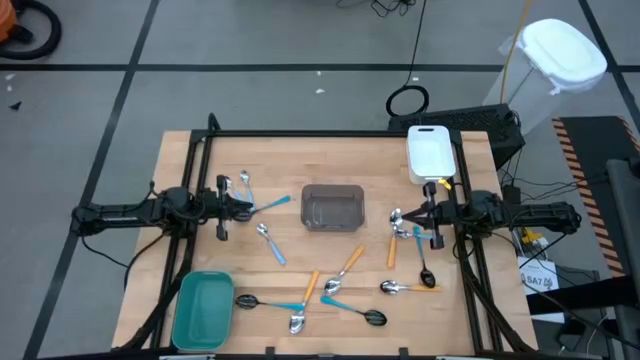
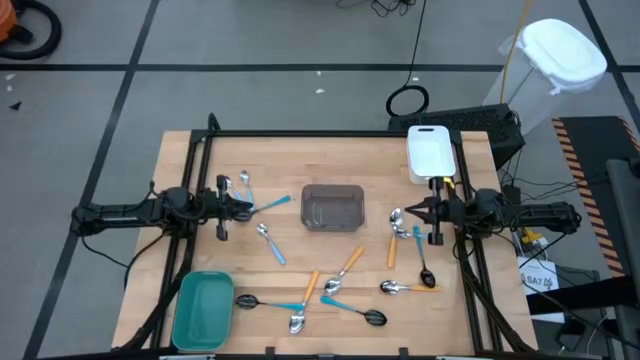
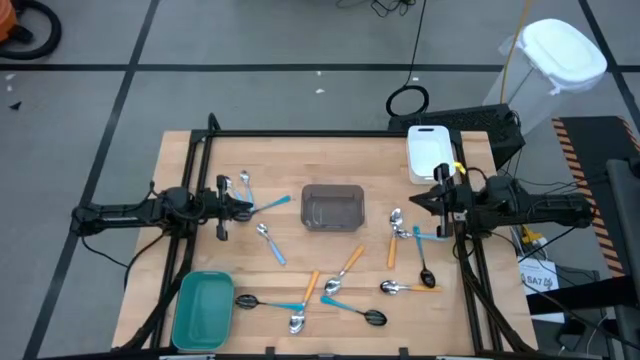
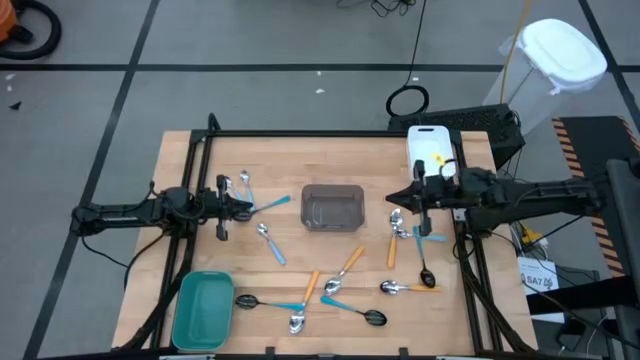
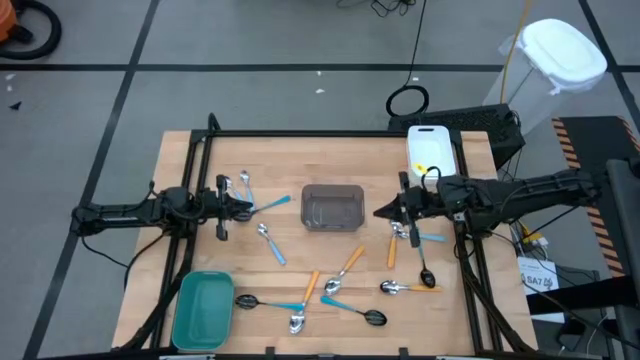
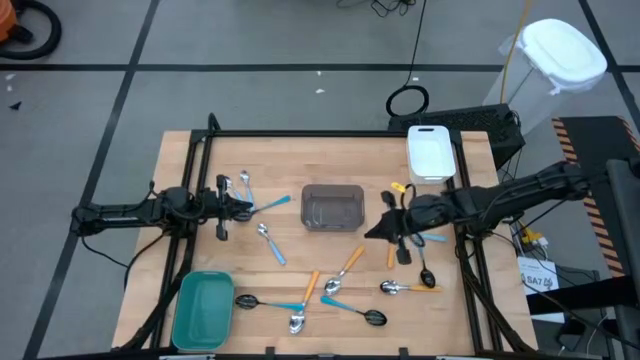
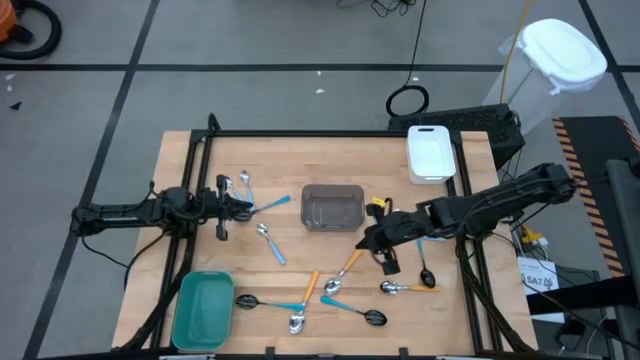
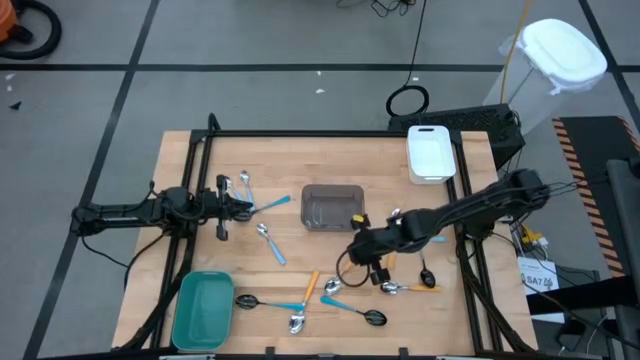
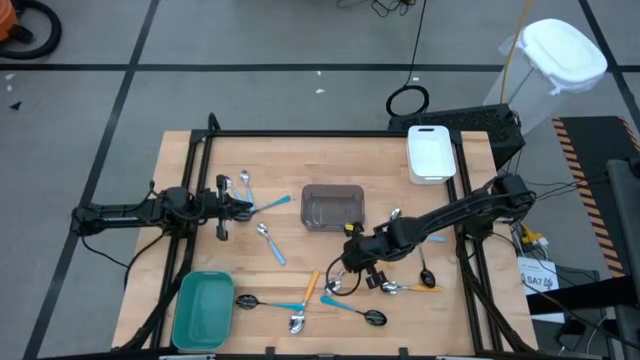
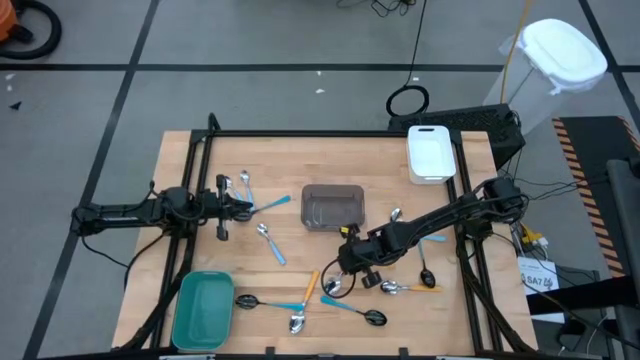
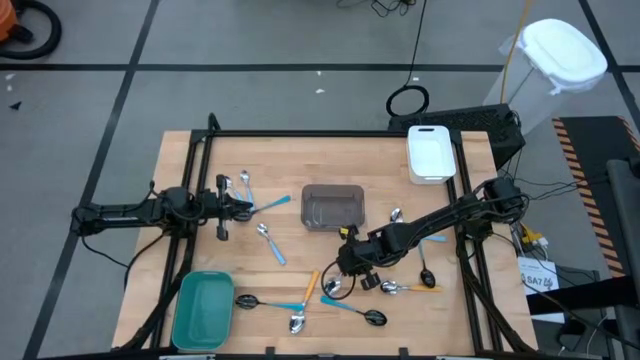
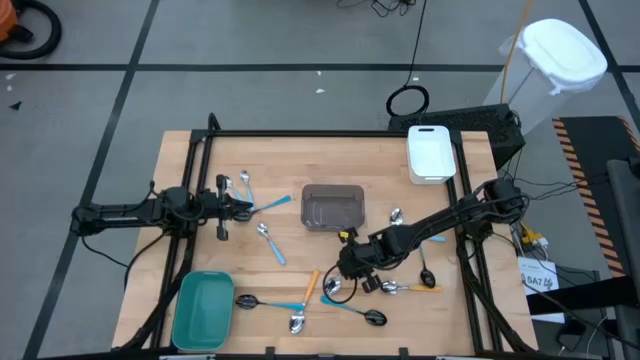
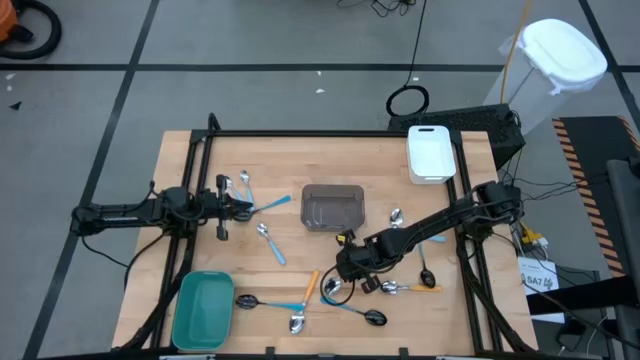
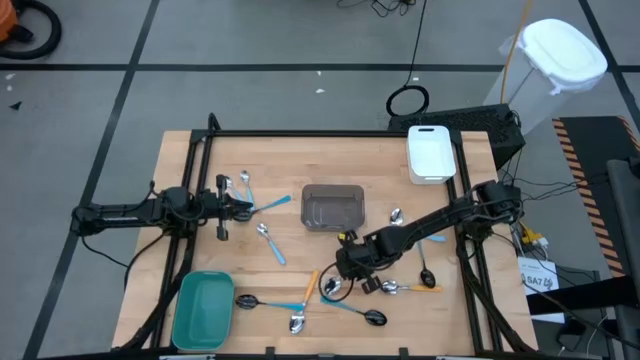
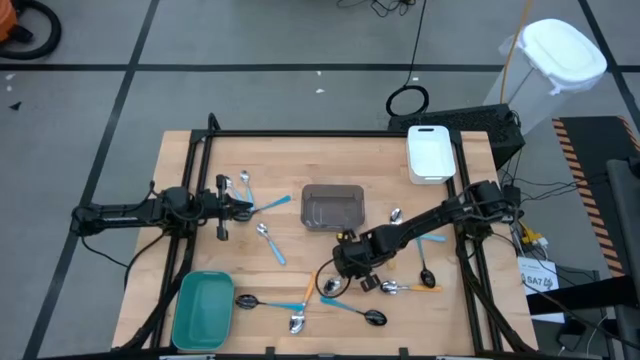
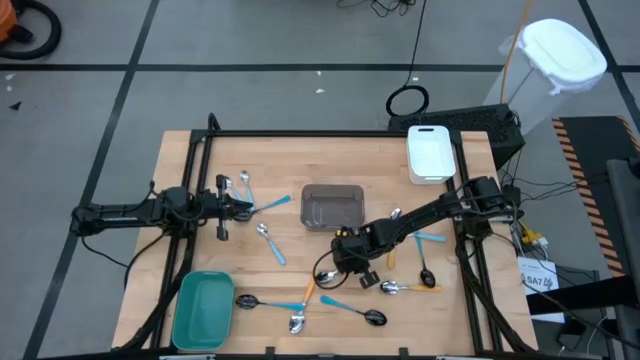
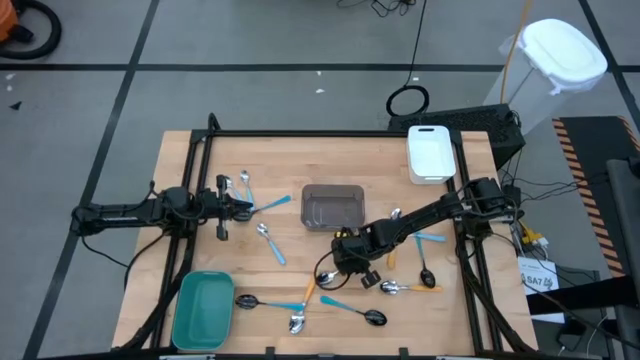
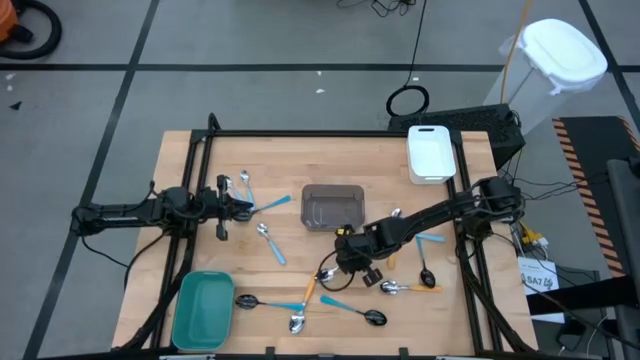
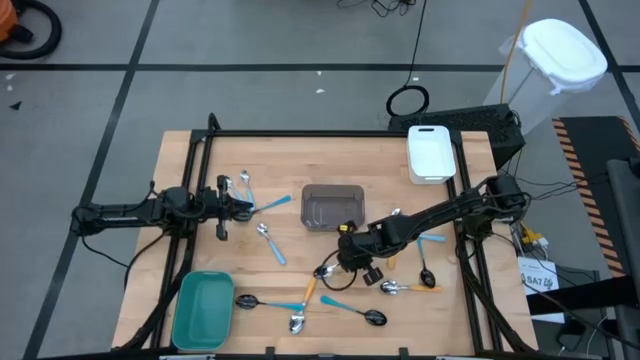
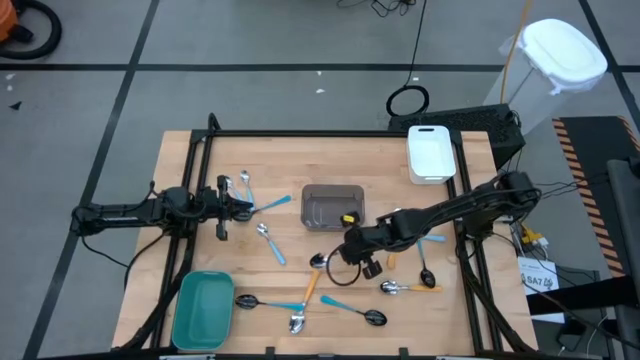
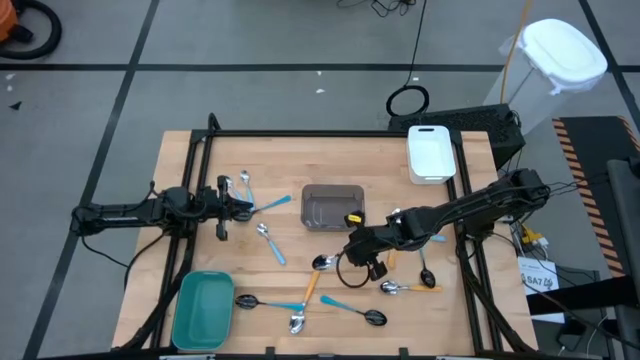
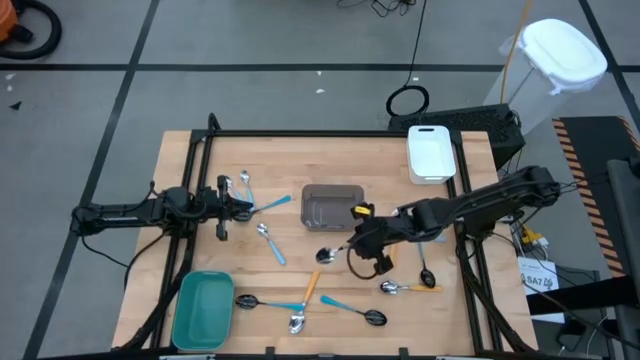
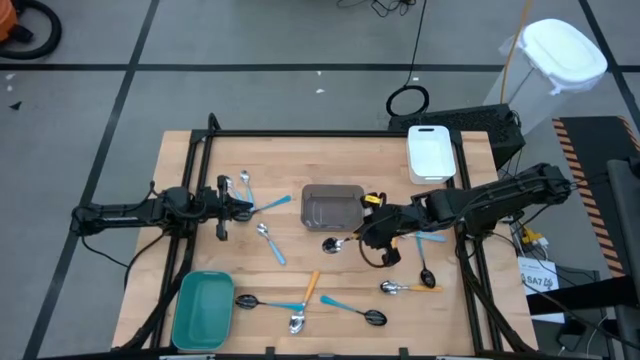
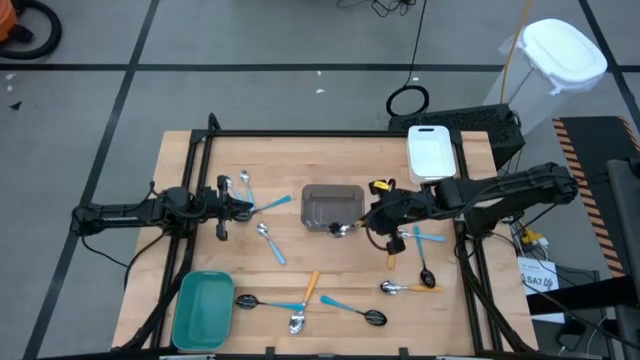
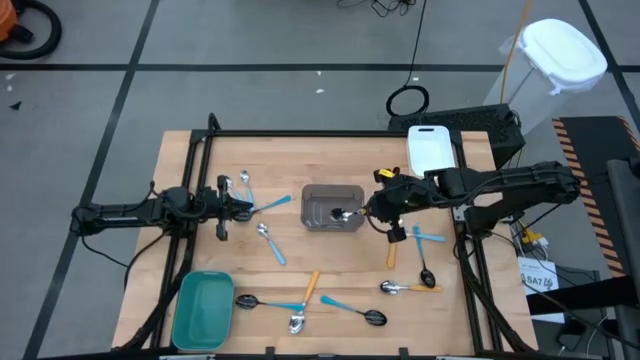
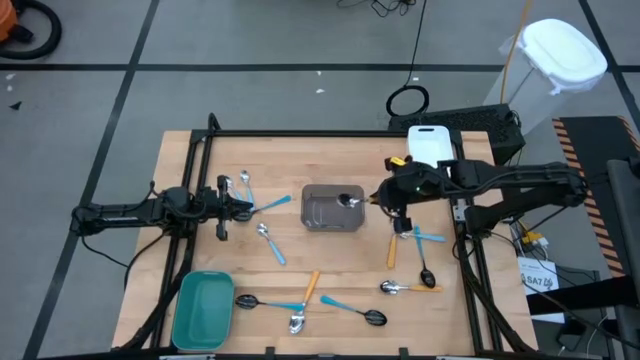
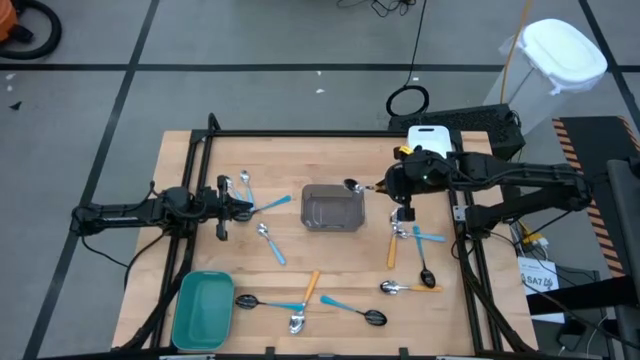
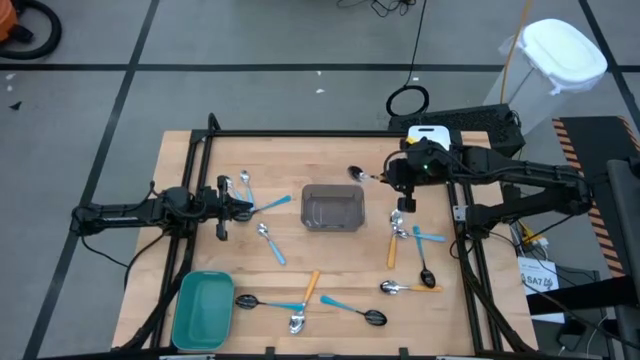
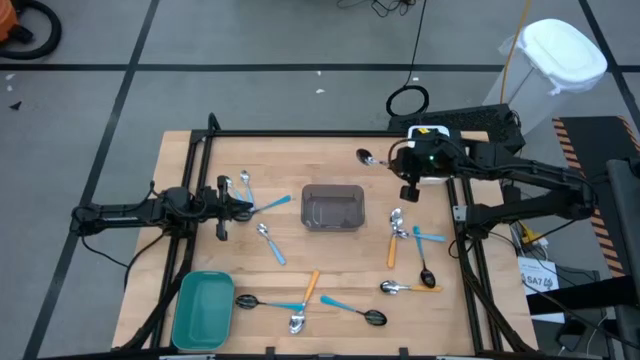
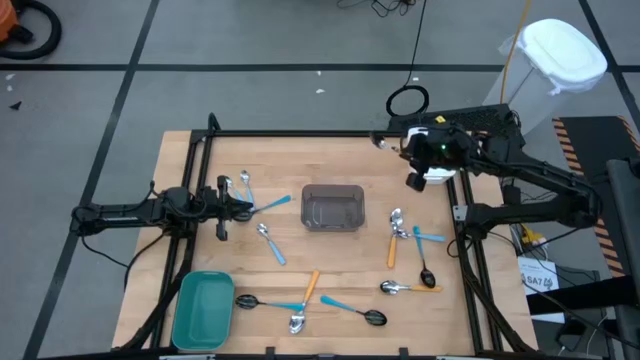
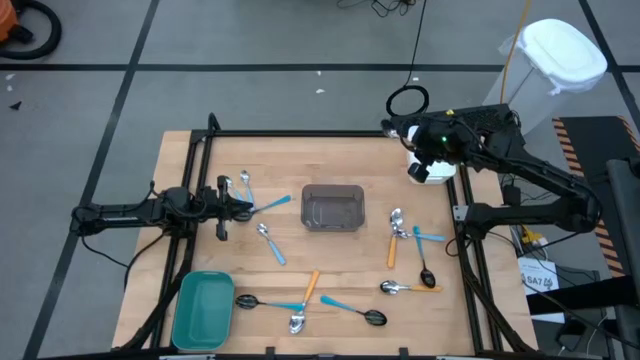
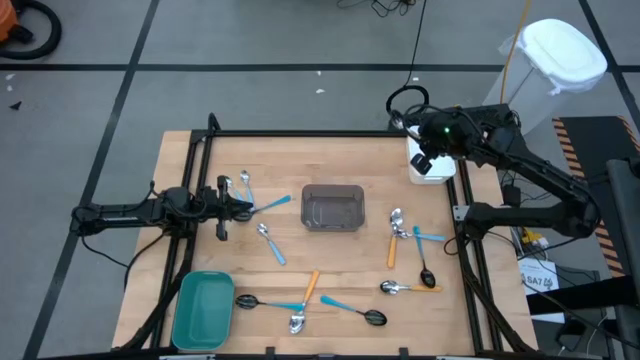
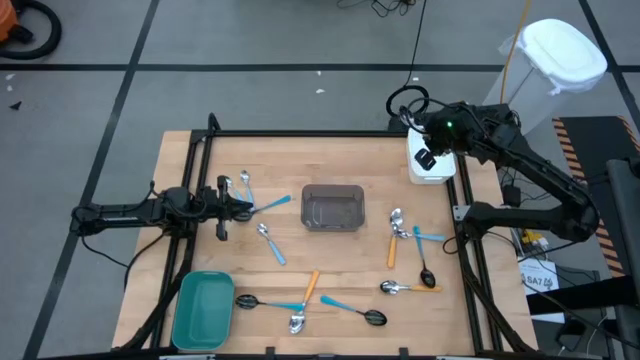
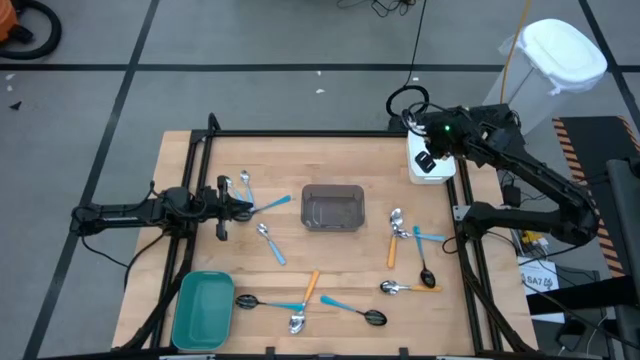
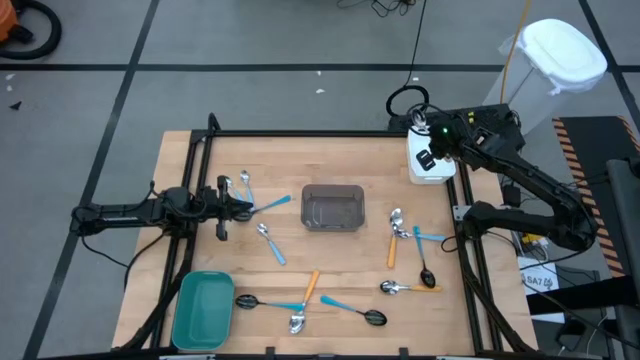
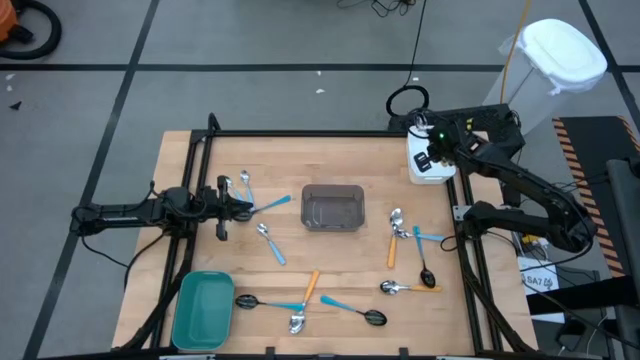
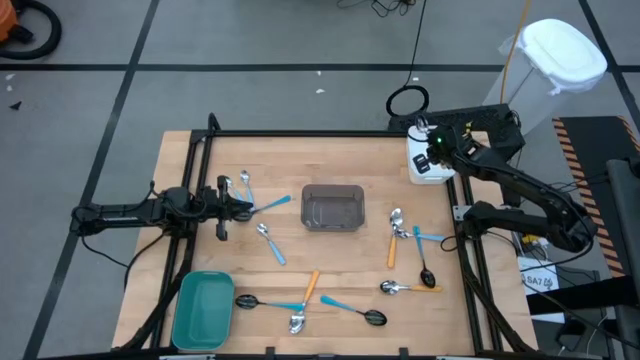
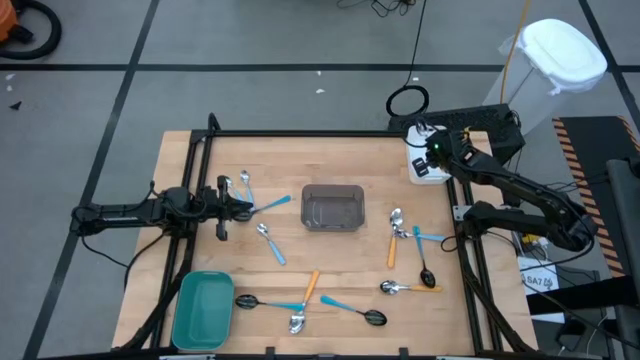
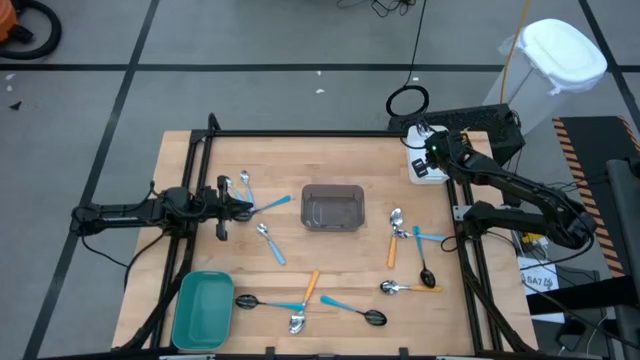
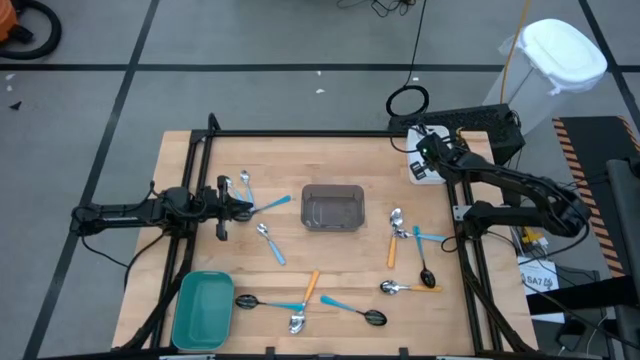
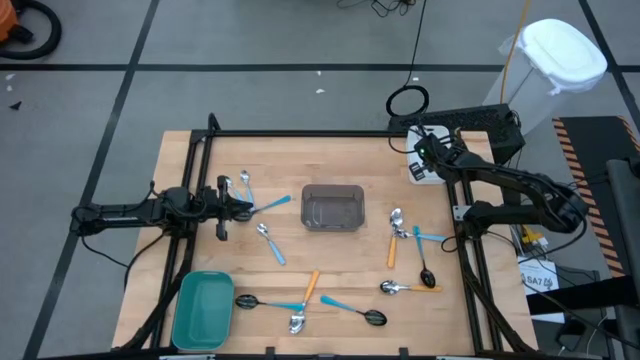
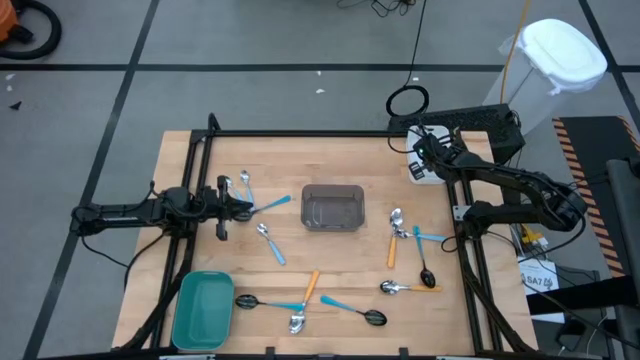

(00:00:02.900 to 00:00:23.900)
Task: Sort silverware by color (type)
Put the top left yellow spoon into the white bin
